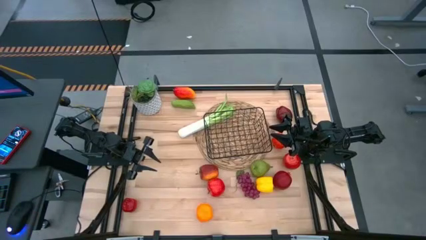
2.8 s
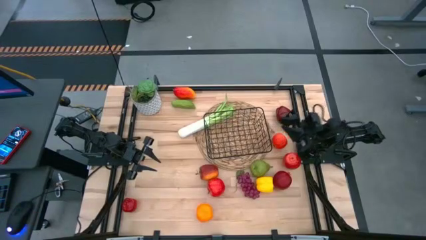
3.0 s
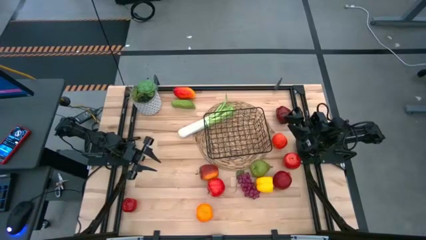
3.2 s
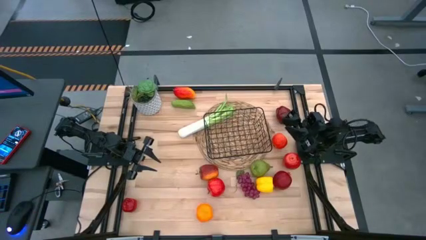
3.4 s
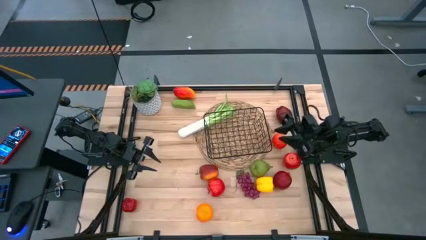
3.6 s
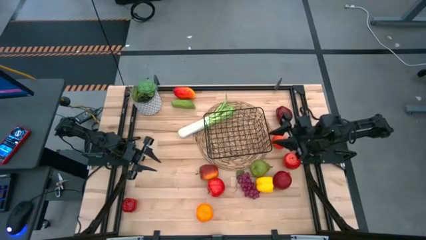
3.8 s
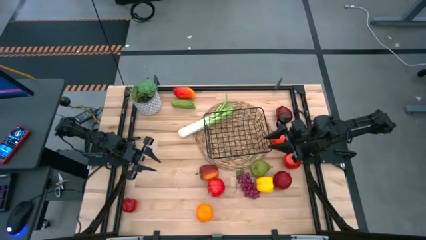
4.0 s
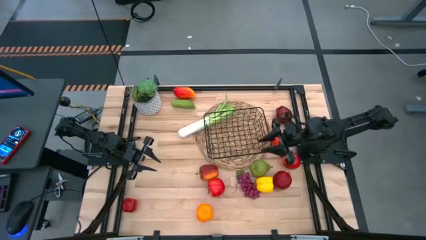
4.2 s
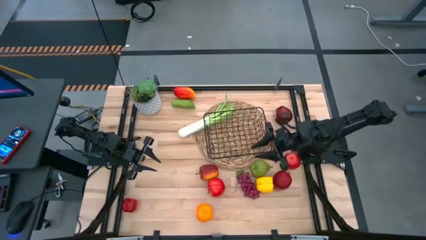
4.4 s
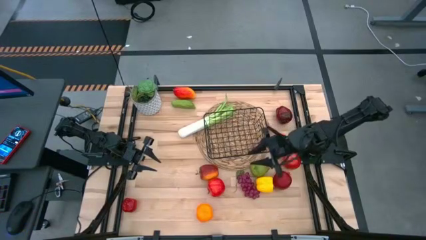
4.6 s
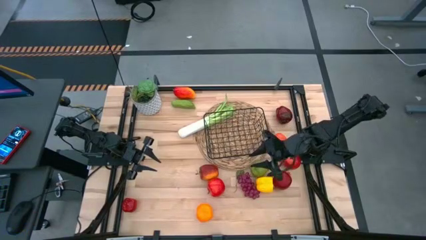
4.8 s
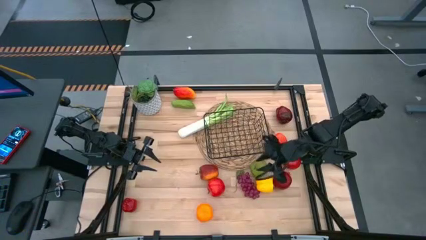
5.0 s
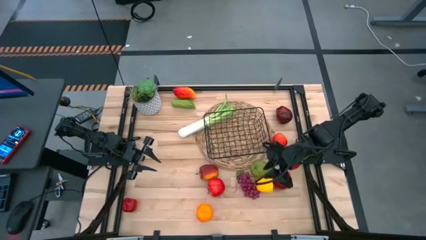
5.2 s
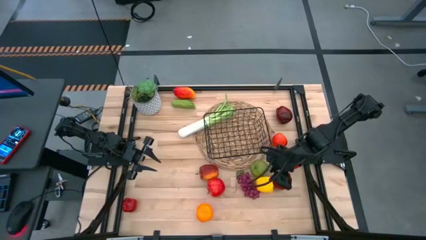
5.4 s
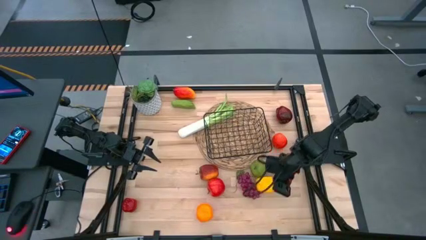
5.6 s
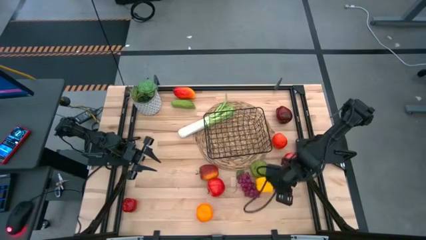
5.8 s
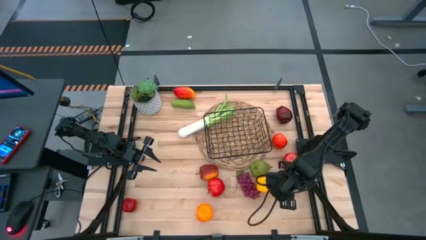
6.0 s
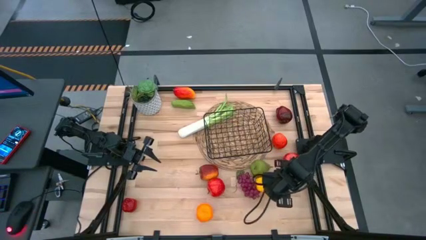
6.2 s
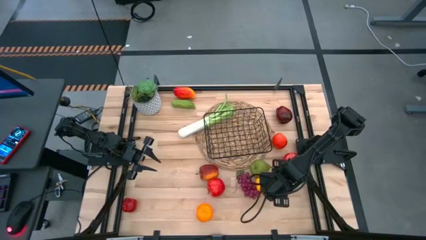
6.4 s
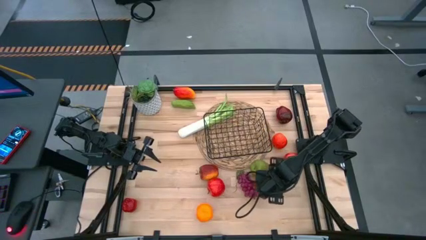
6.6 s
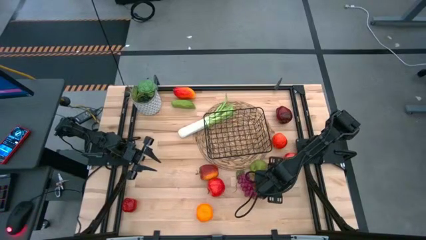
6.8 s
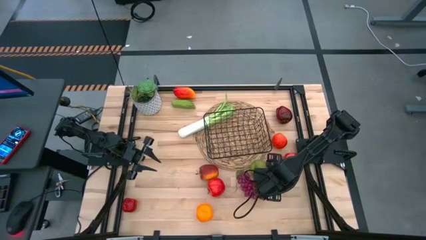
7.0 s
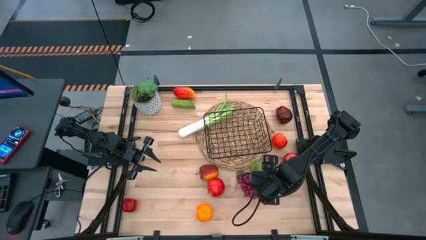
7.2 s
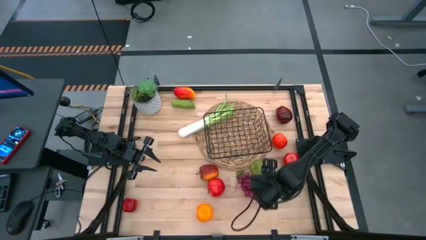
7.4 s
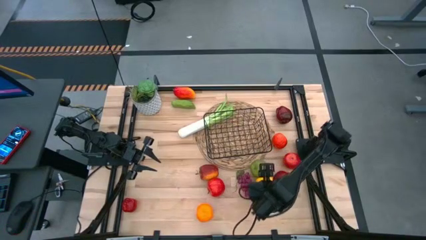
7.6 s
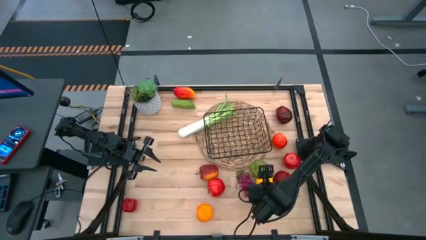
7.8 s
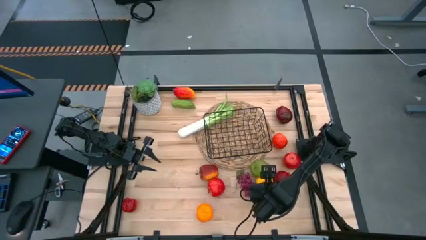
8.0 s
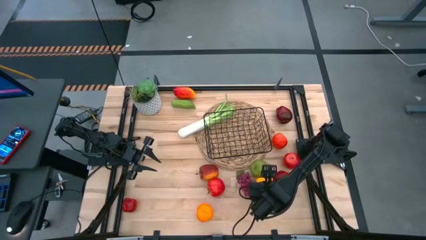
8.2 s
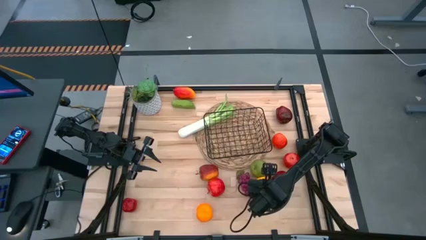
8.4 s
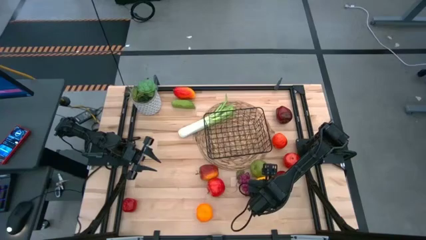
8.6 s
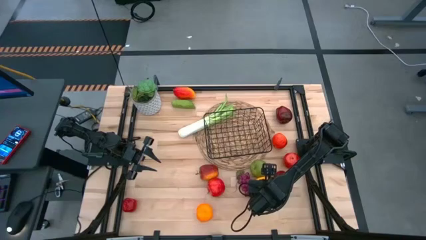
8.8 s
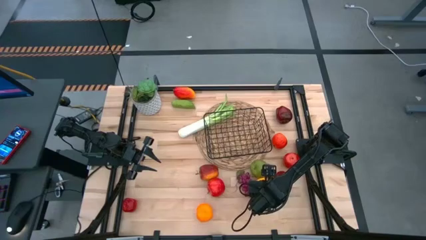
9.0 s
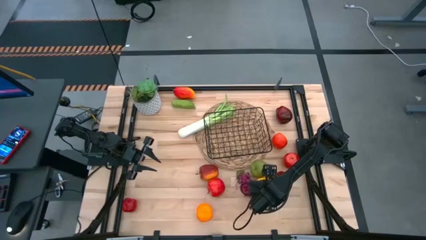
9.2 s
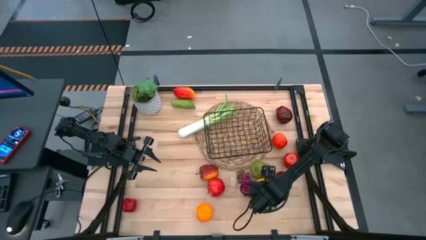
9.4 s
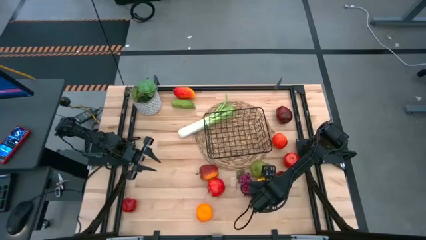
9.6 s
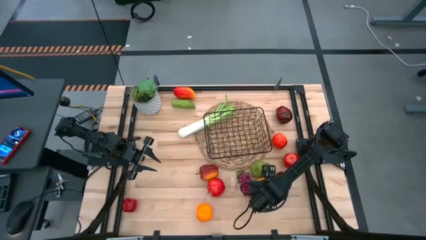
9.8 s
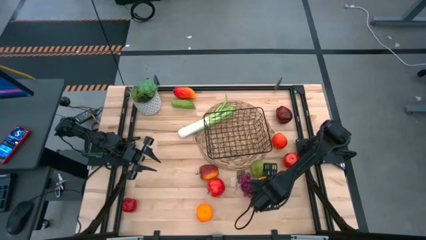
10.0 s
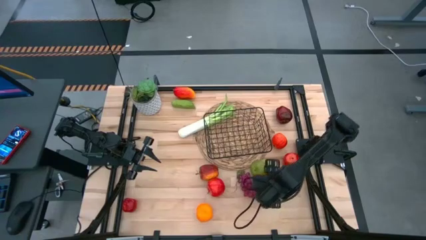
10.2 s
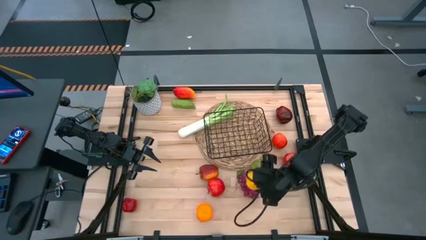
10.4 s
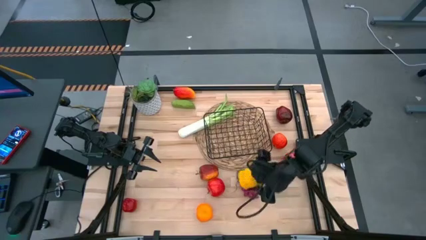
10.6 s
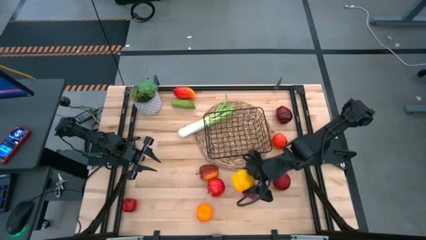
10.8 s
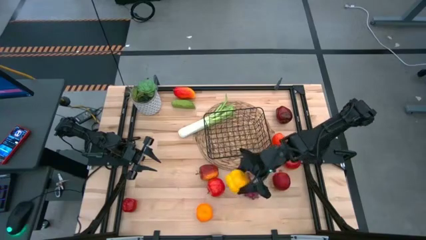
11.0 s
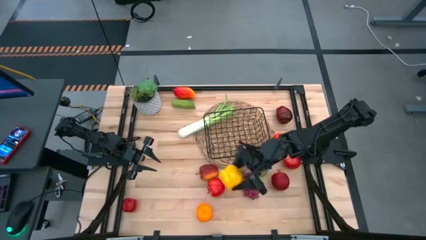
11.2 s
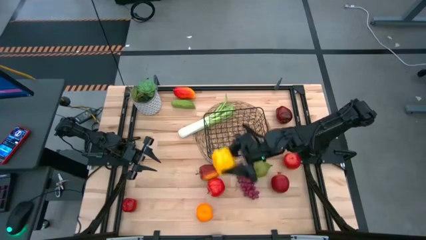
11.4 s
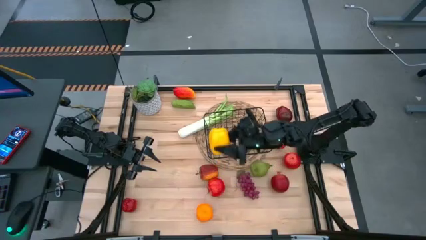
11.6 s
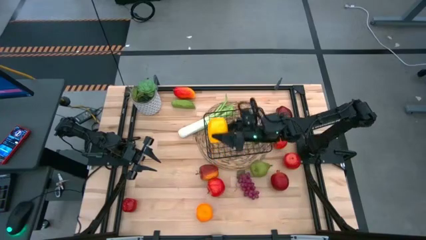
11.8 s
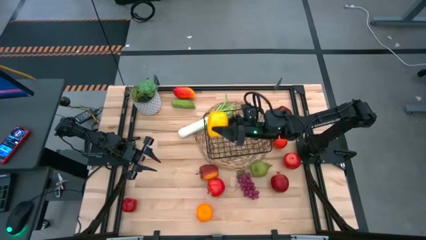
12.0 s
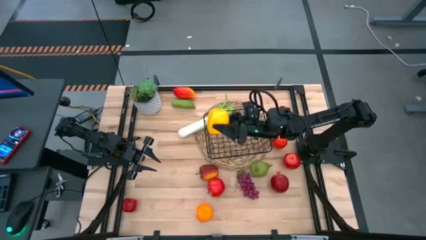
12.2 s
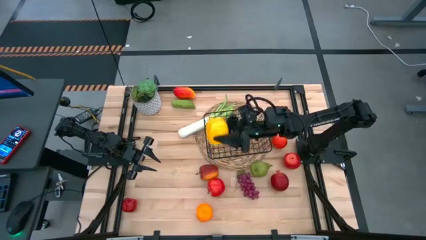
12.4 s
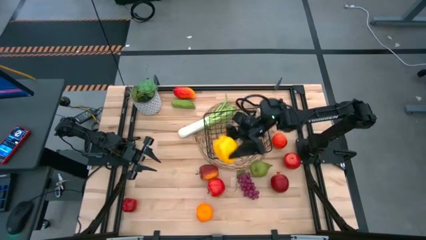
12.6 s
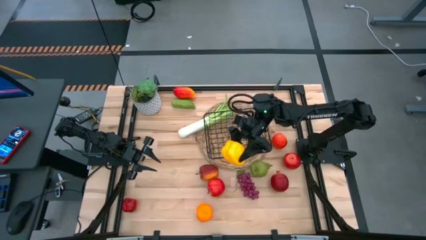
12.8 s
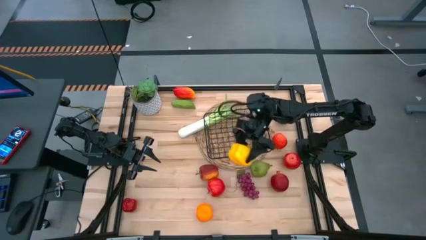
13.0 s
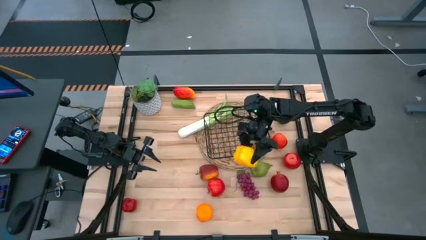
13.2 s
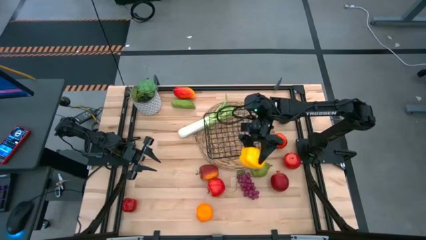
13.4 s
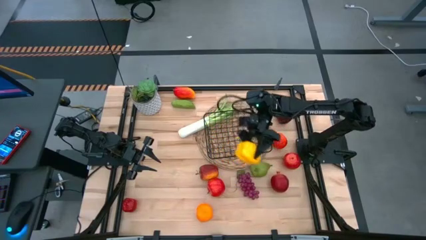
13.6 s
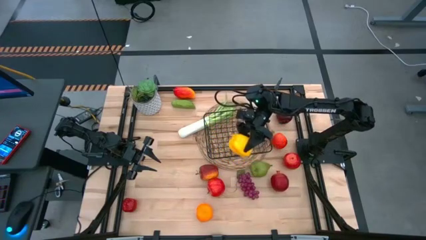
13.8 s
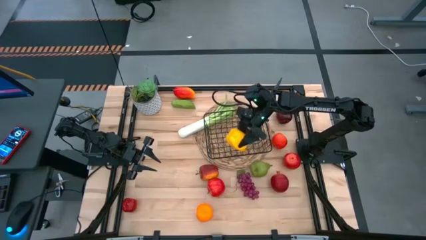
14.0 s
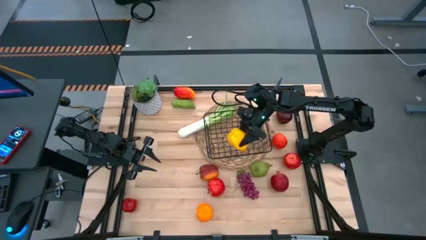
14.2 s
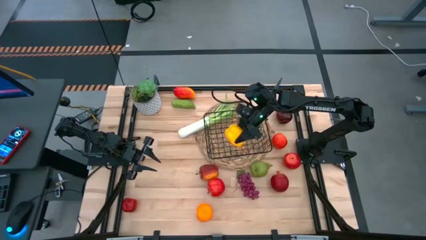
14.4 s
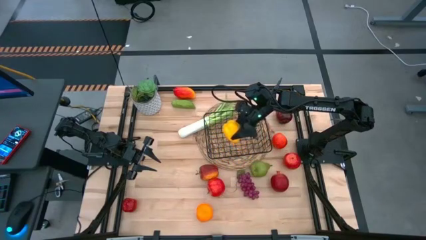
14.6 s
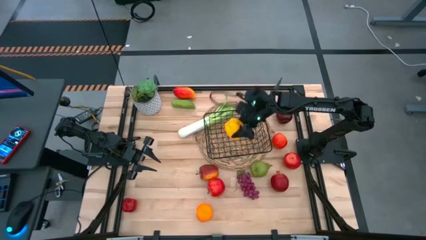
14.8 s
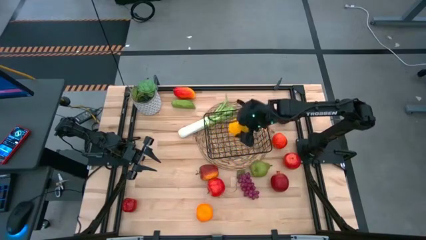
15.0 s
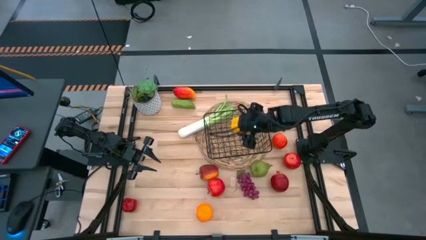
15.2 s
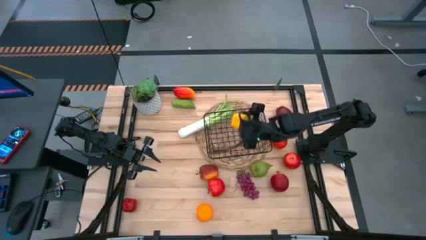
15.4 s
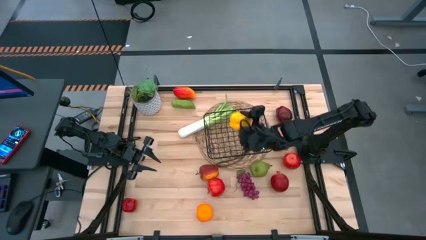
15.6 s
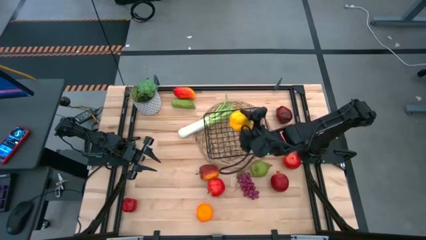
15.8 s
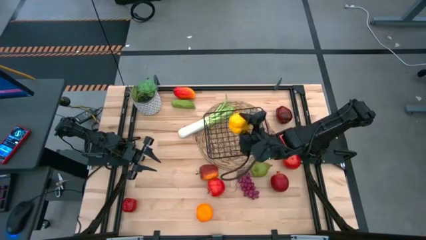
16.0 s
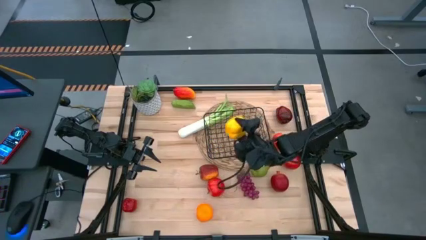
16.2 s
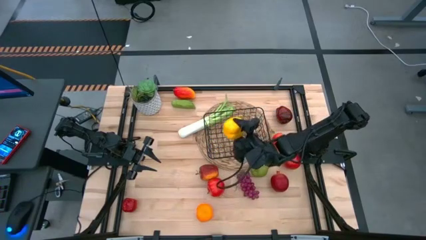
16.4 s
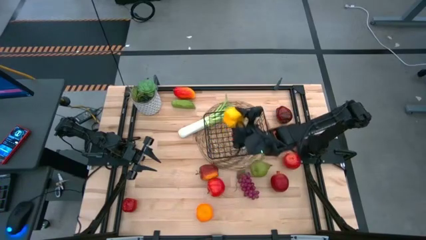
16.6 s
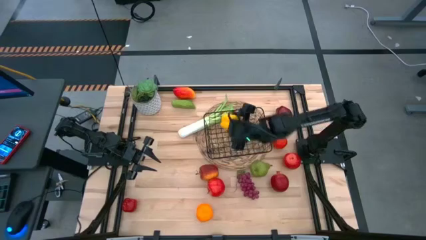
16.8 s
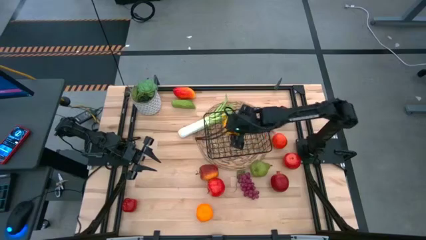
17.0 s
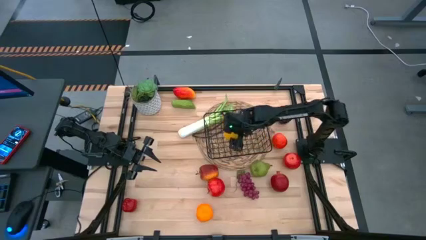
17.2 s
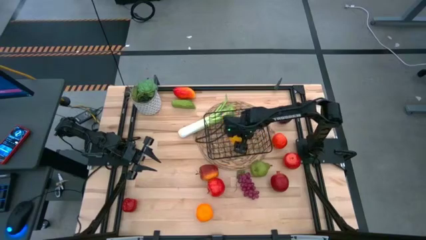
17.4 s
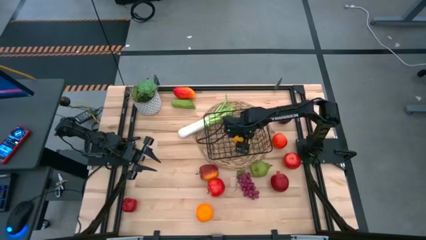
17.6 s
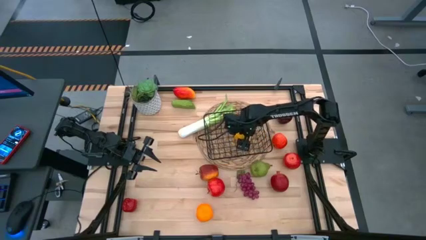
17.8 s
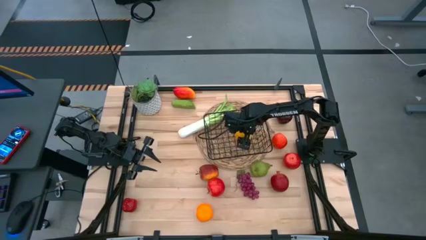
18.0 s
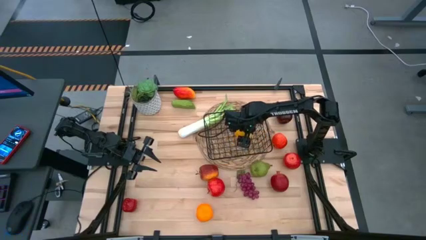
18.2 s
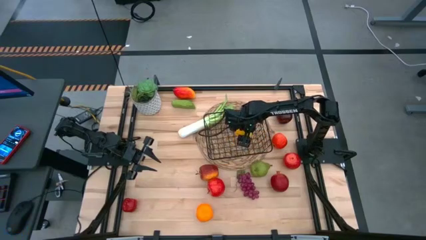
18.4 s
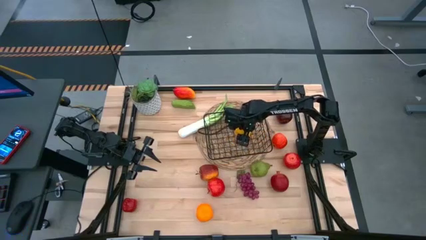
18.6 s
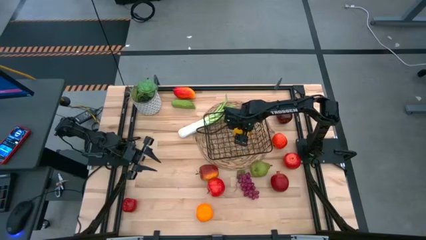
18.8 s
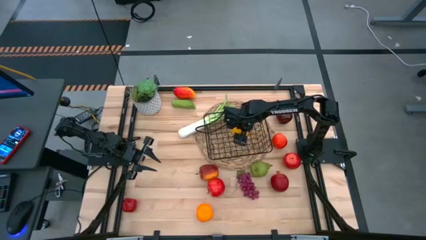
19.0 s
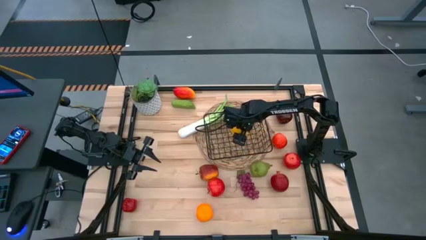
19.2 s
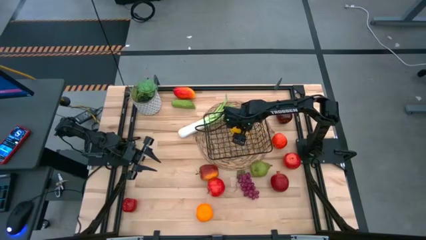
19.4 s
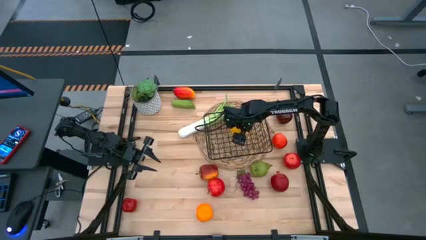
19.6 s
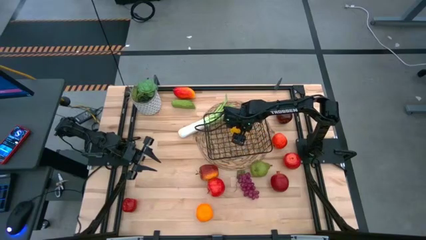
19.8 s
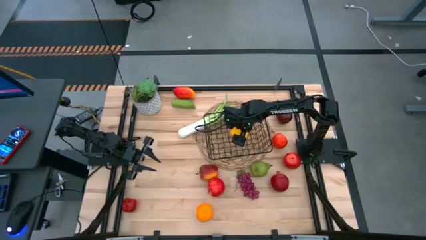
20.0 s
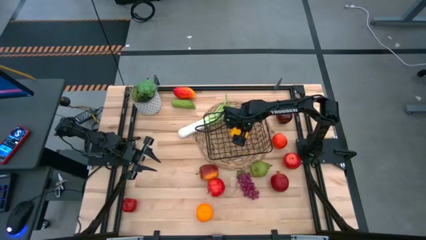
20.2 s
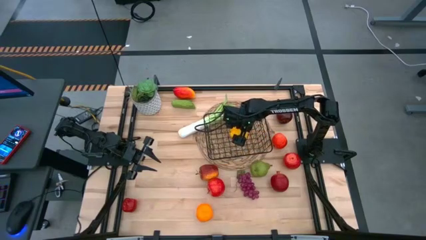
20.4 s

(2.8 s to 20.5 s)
Task: Build produce basket
Put the bell pepper into the wire basket
